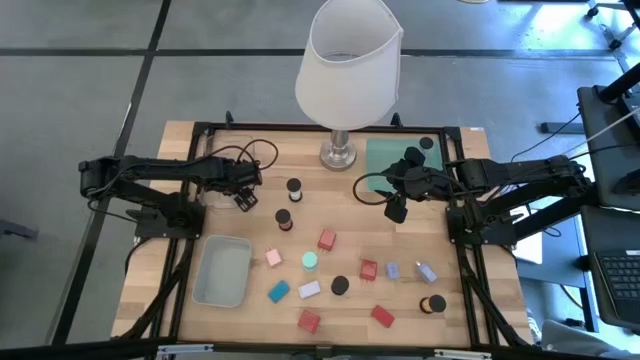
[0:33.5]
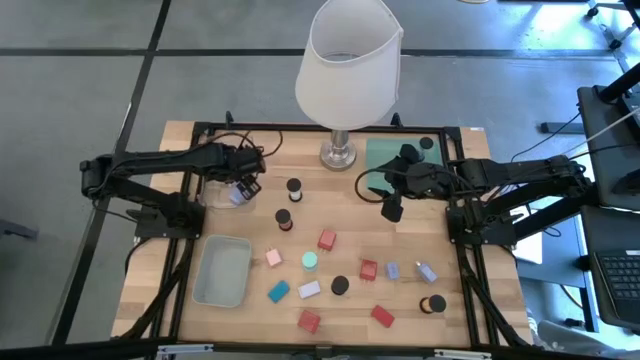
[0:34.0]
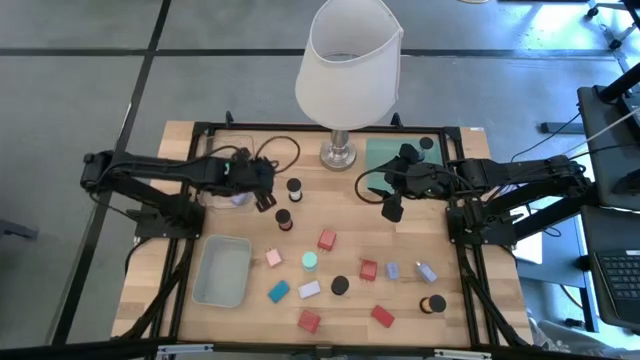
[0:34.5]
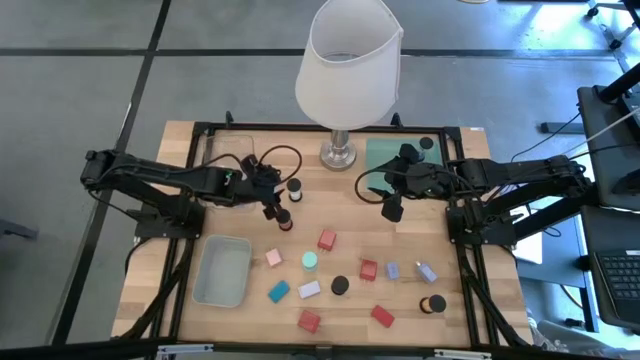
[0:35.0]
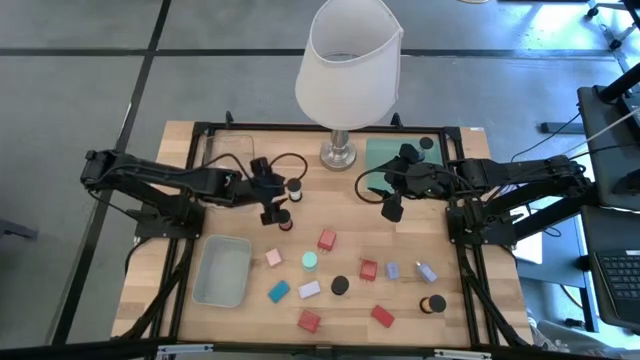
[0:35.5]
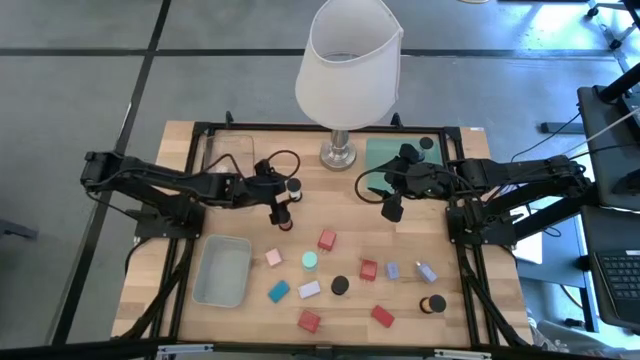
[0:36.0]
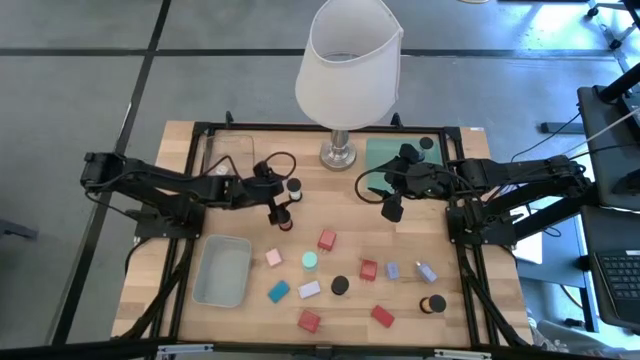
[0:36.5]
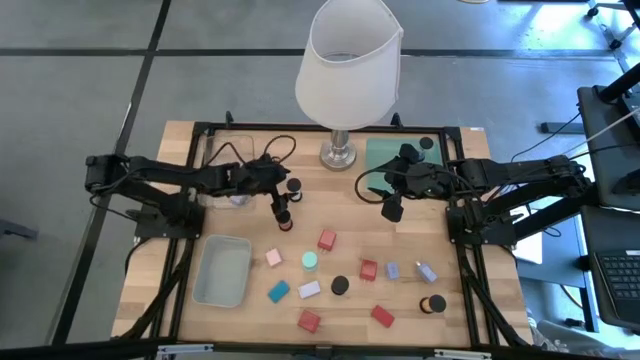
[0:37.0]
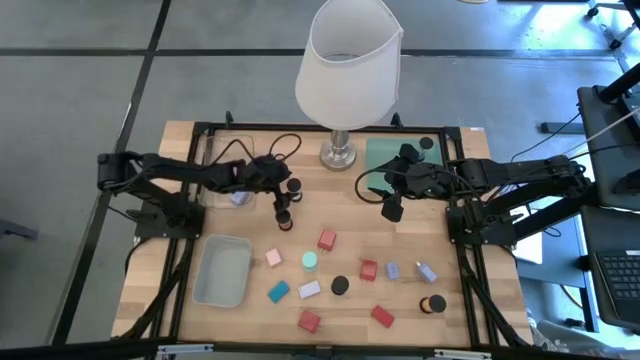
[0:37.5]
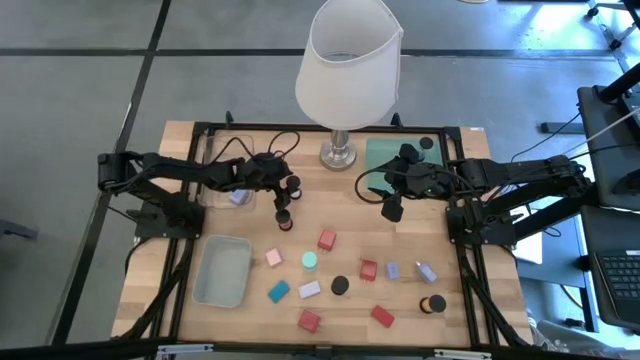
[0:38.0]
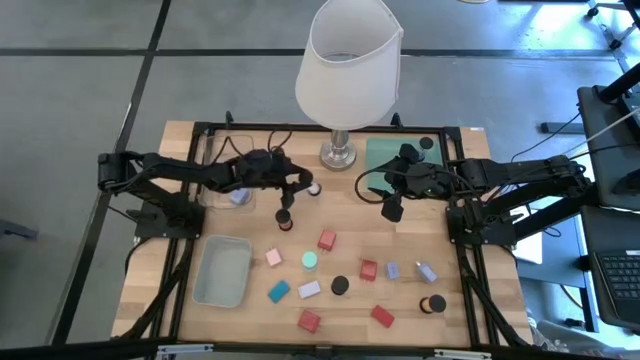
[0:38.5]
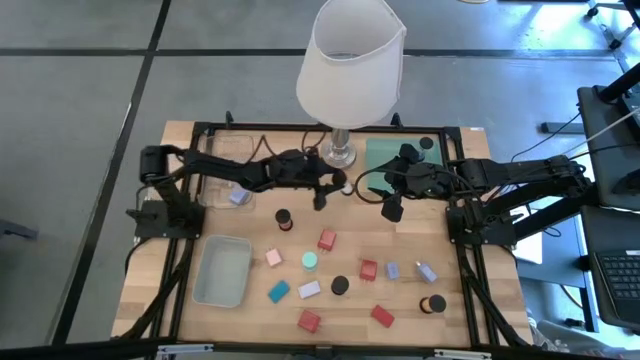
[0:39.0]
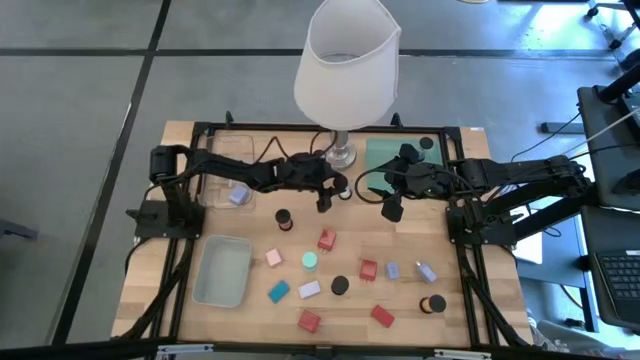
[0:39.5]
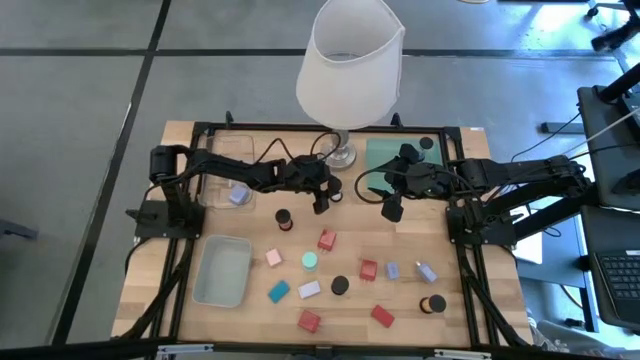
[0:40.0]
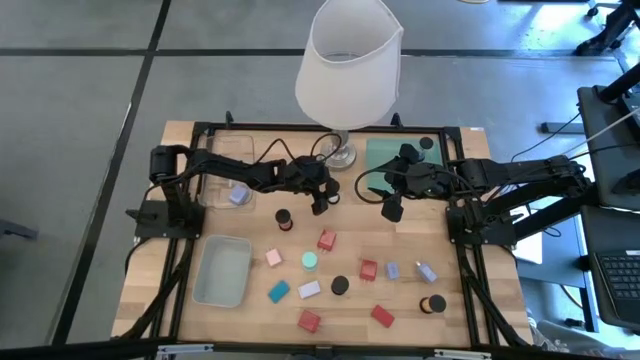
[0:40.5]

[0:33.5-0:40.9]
Task: Pick & Place Office items
Move the white hourglass to the center of the table

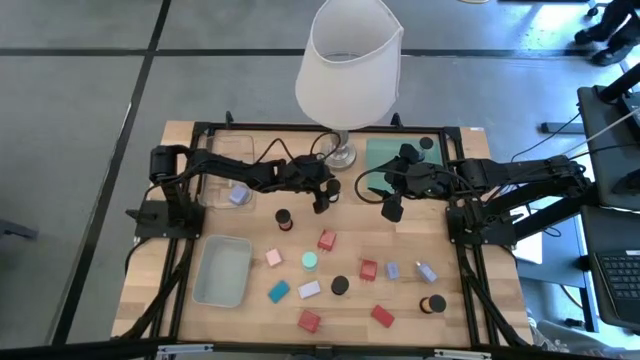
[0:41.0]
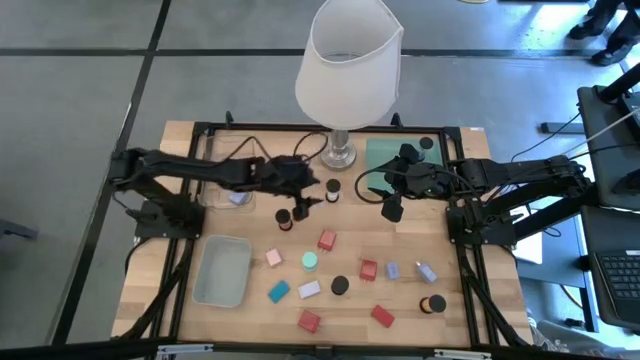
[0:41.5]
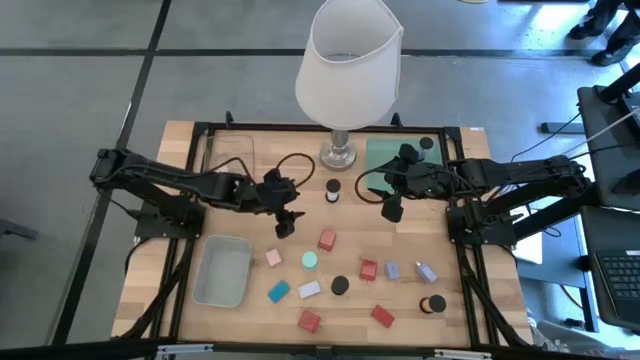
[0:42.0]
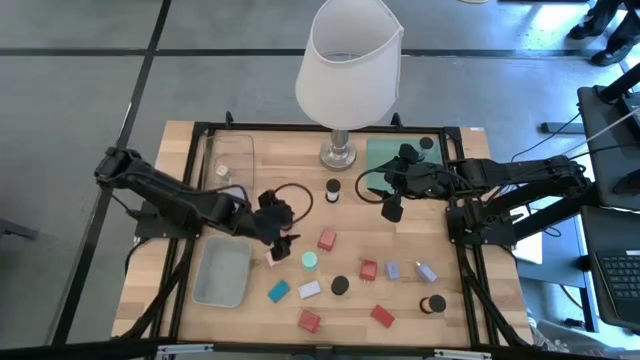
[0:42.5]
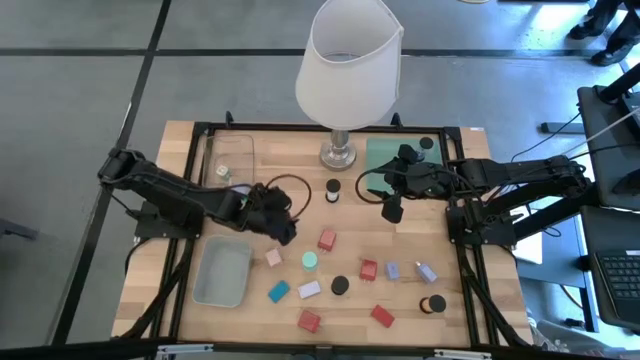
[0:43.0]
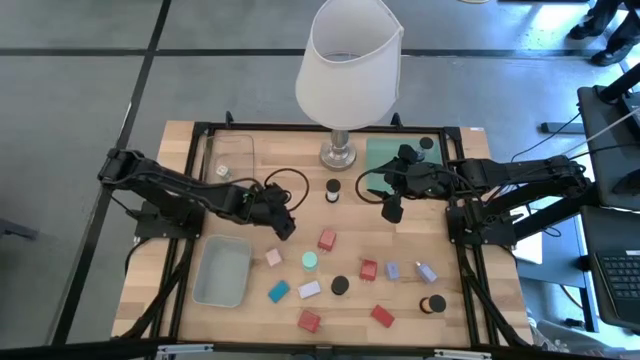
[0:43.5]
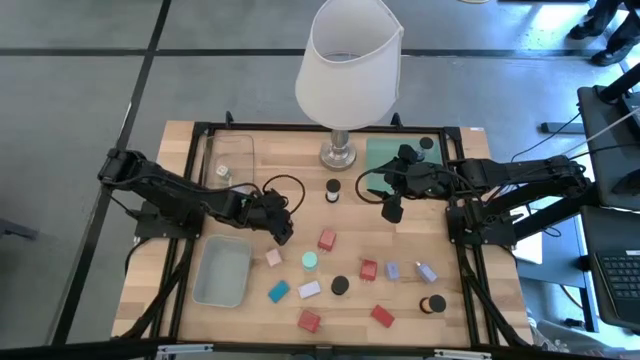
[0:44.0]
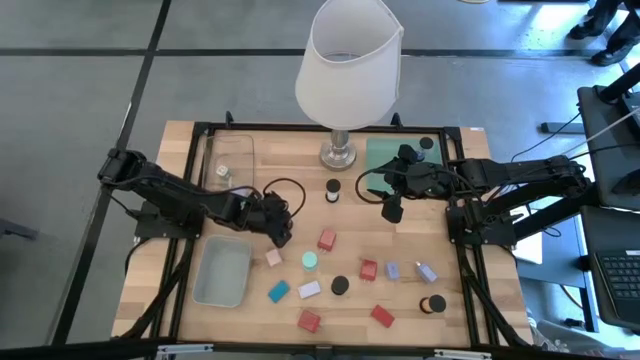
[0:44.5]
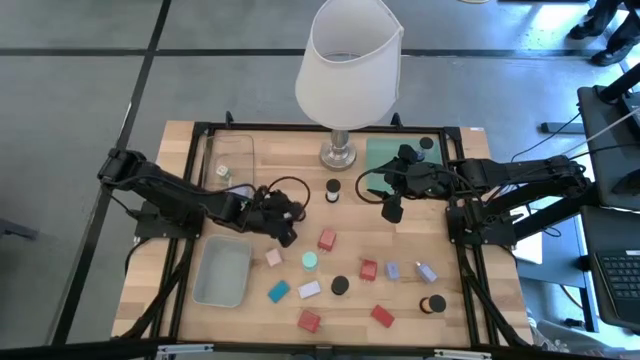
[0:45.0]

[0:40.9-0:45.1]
Put the red hourglass into the green bin

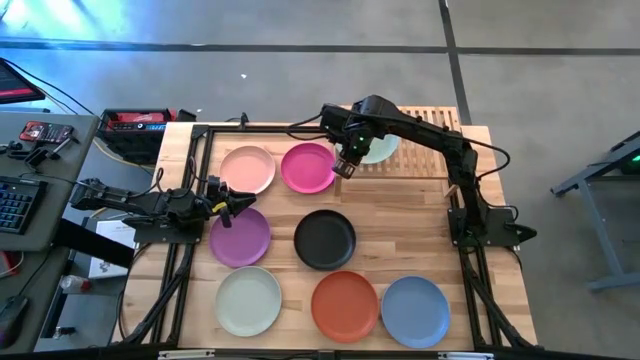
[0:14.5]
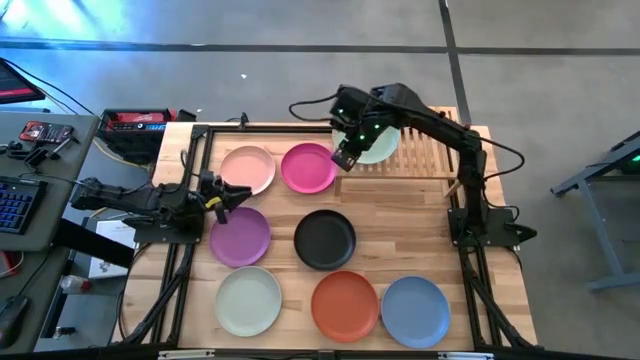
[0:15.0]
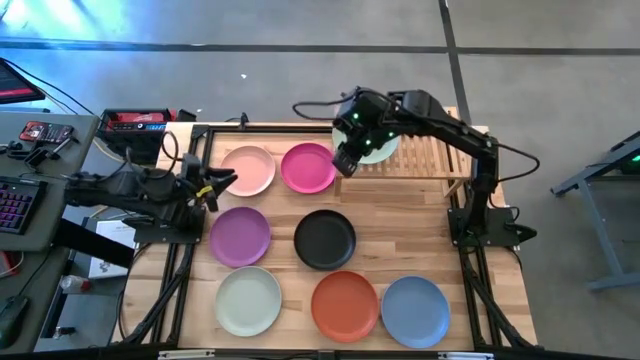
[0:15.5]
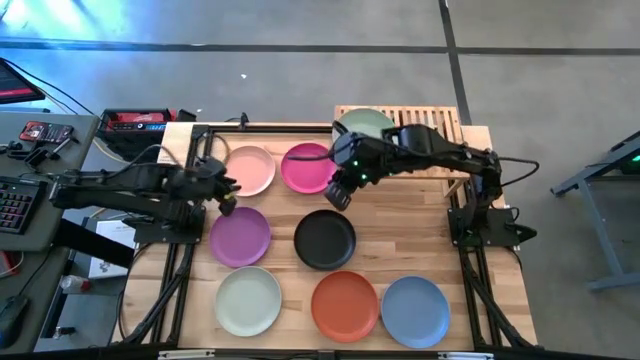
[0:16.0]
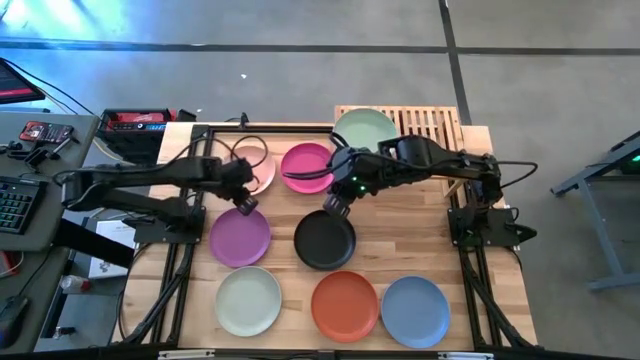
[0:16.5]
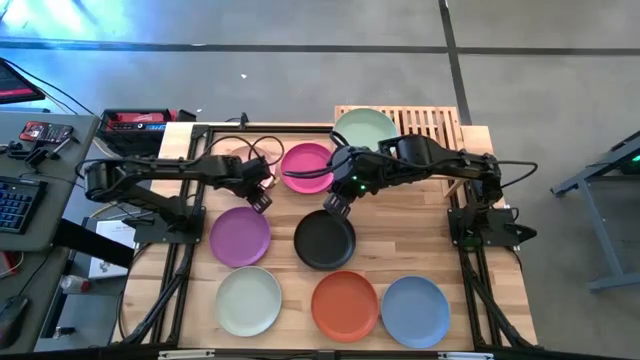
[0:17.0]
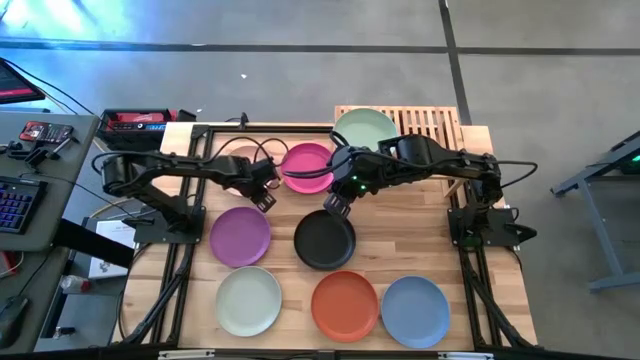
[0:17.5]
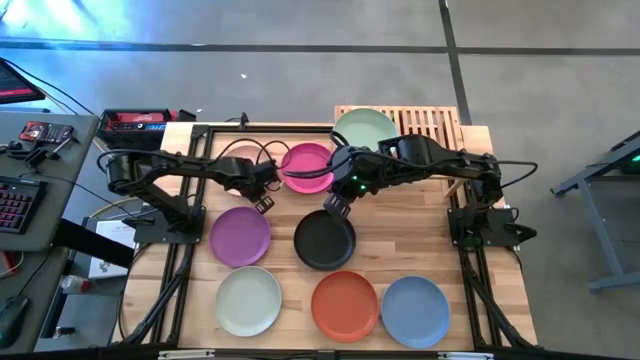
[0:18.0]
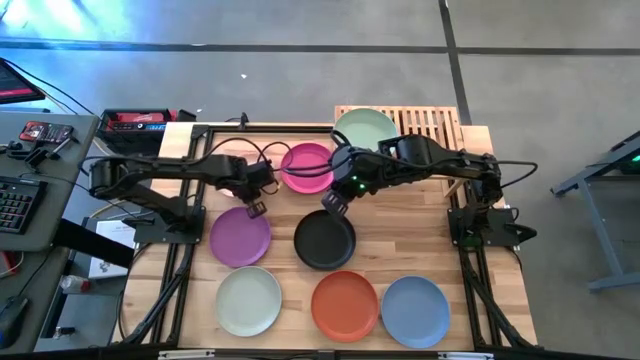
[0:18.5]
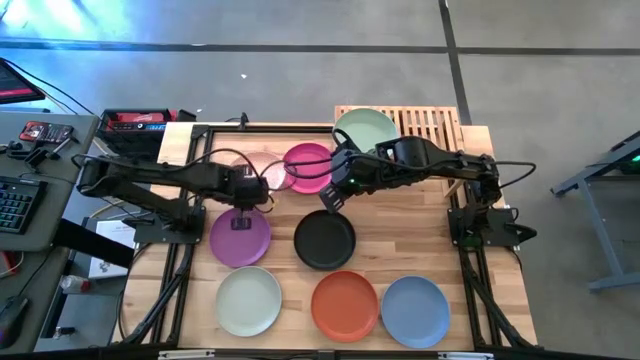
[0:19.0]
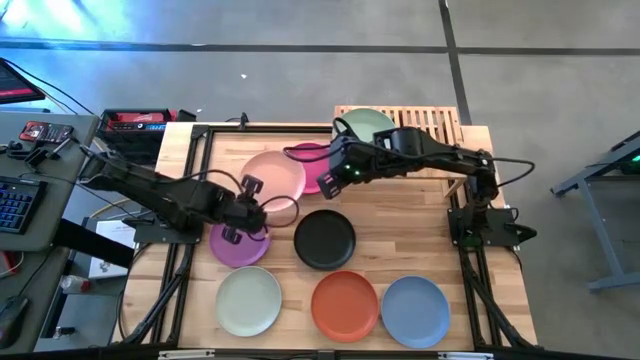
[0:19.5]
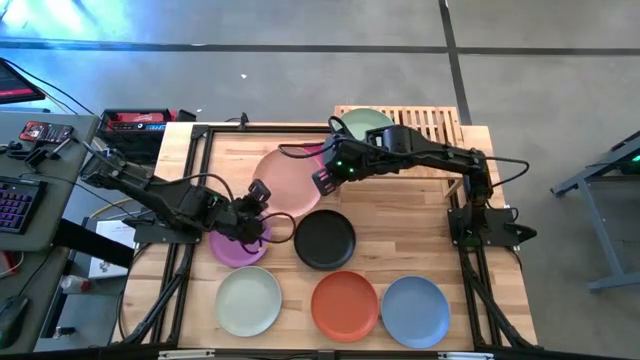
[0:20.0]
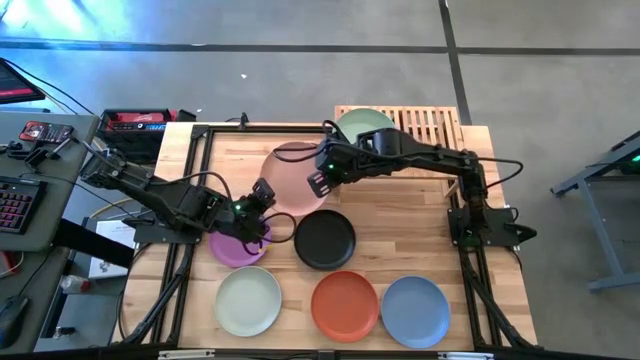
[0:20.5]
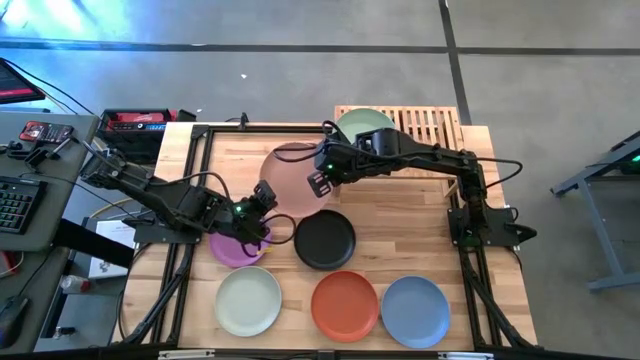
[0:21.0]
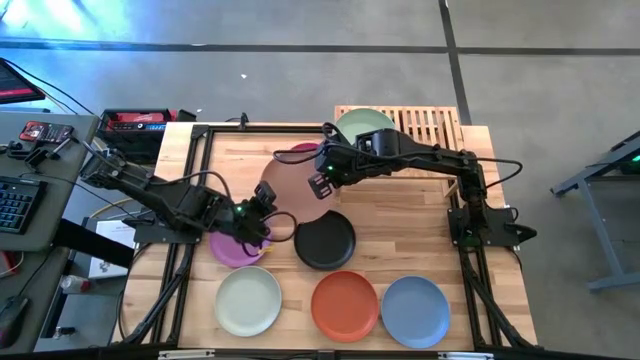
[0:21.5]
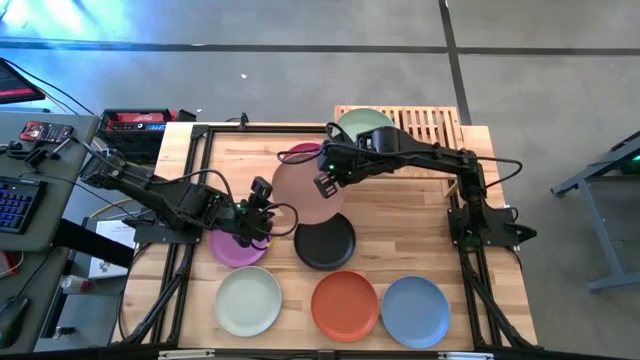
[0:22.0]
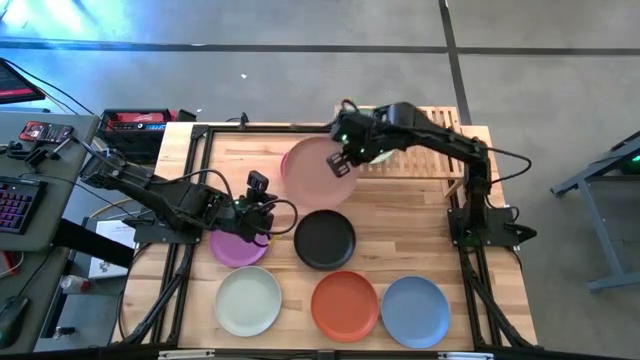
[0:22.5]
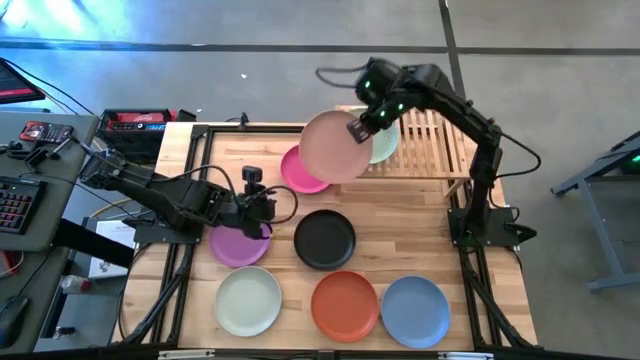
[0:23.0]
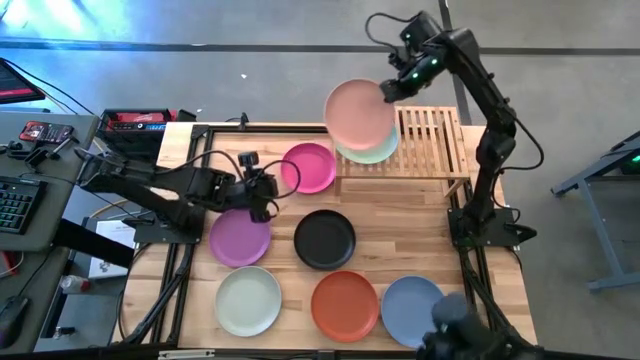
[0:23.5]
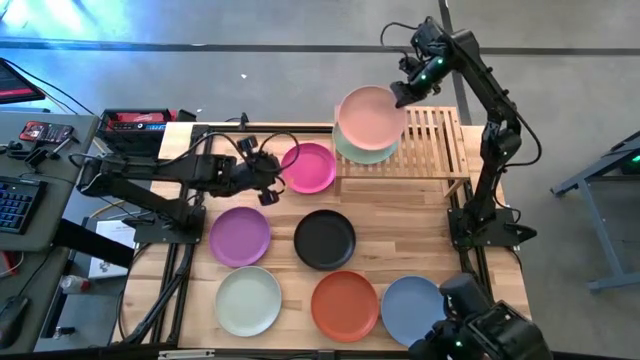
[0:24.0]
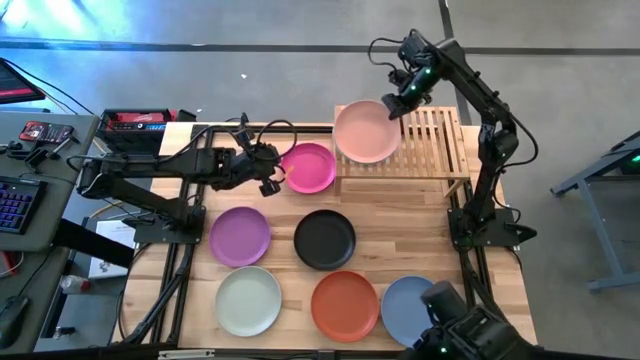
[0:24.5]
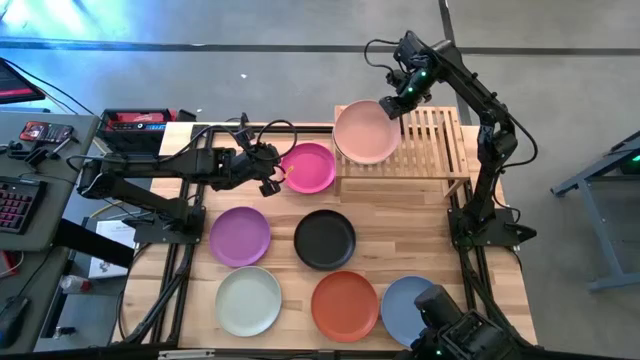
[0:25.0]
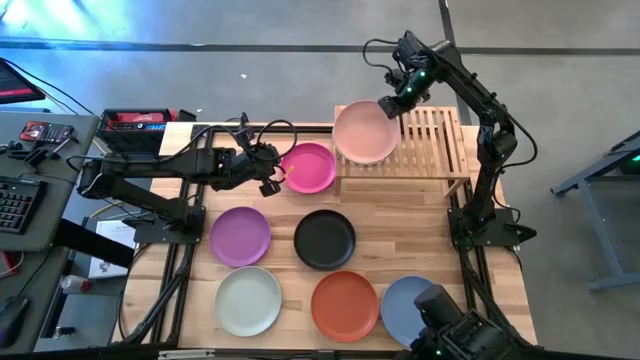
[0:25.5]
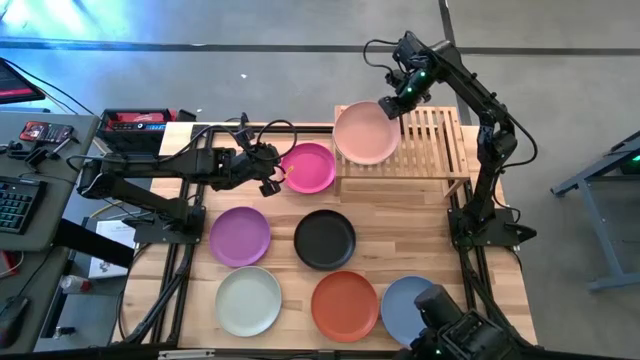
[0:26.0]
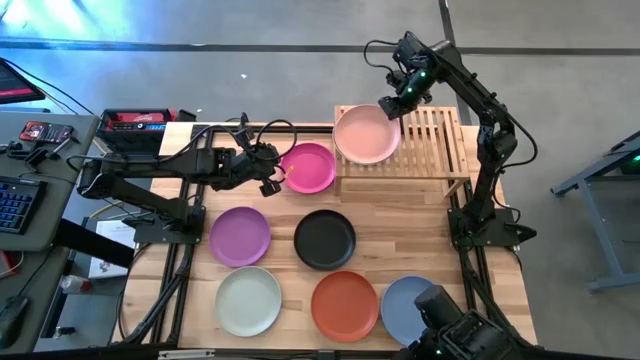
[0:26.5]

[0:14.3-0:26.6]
Task: Place and stack plates onto a shelf
Stack the top left light pink plate on the green plate
